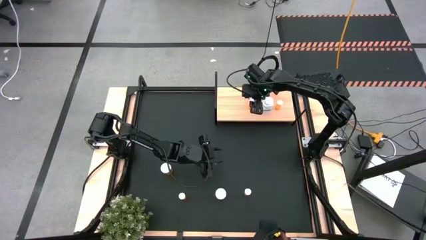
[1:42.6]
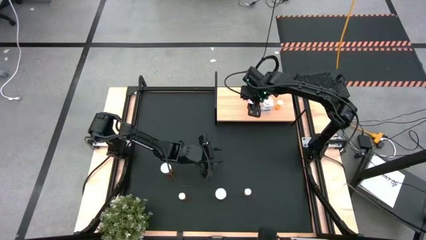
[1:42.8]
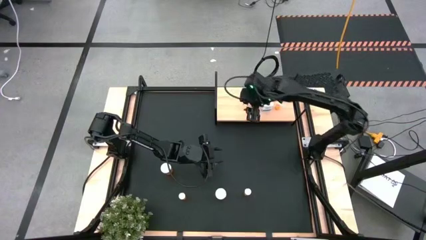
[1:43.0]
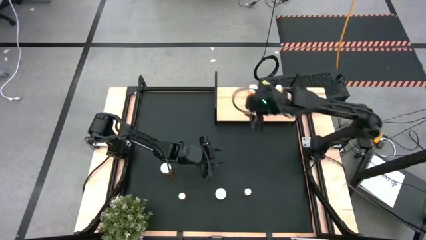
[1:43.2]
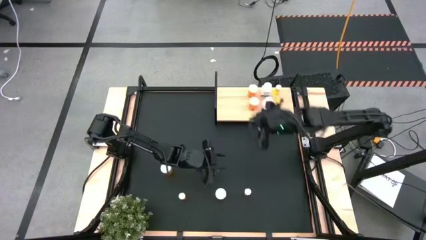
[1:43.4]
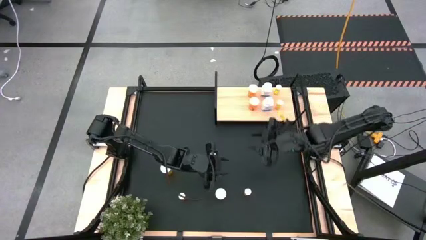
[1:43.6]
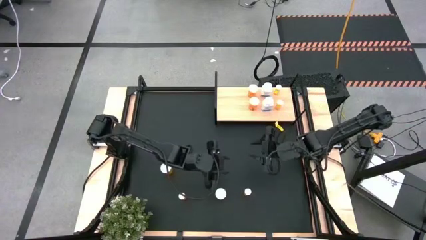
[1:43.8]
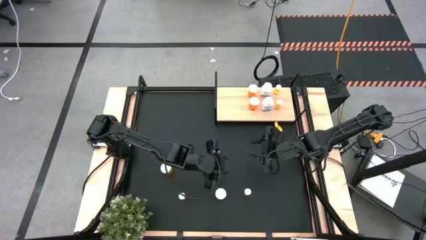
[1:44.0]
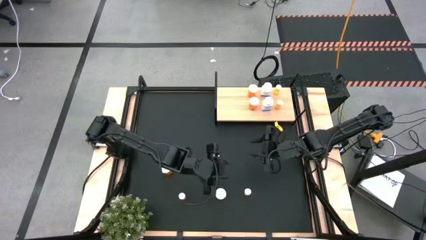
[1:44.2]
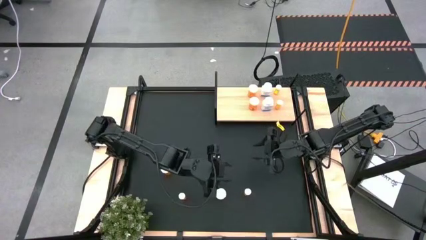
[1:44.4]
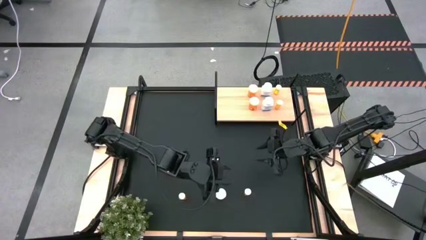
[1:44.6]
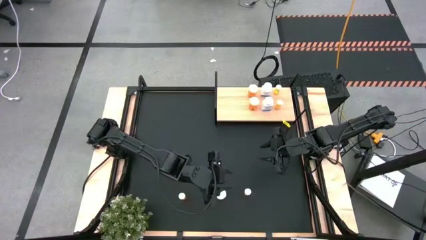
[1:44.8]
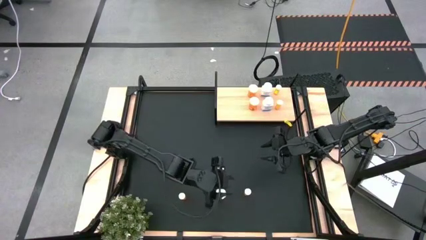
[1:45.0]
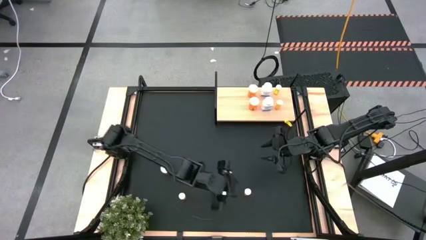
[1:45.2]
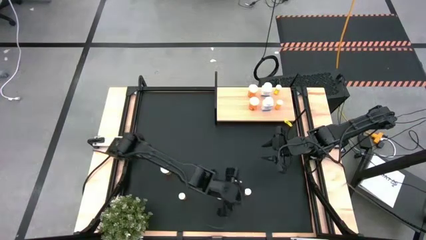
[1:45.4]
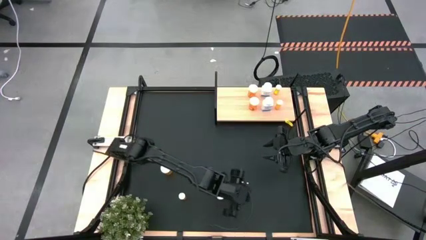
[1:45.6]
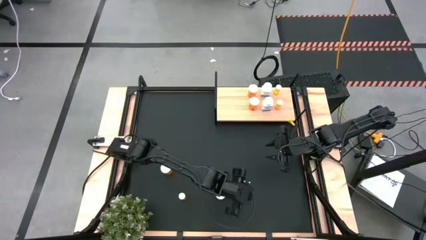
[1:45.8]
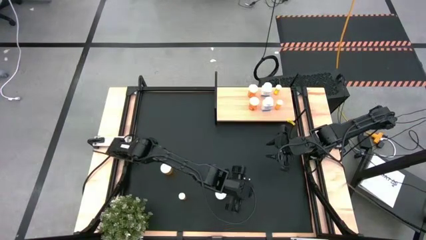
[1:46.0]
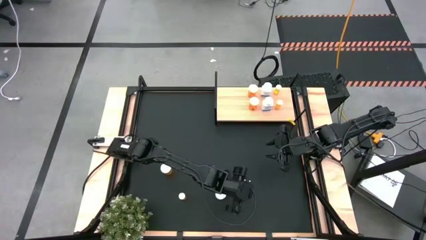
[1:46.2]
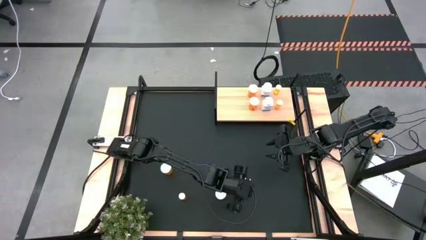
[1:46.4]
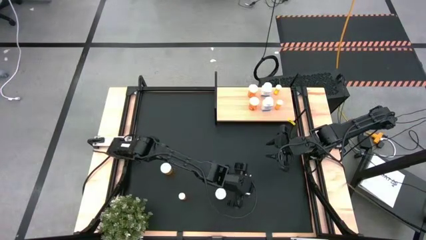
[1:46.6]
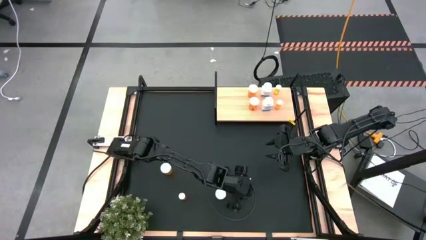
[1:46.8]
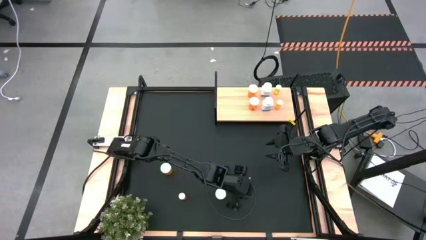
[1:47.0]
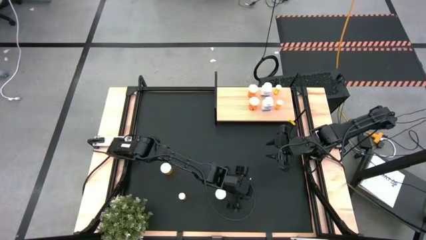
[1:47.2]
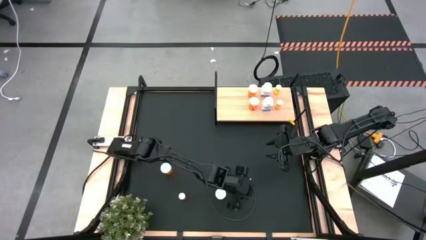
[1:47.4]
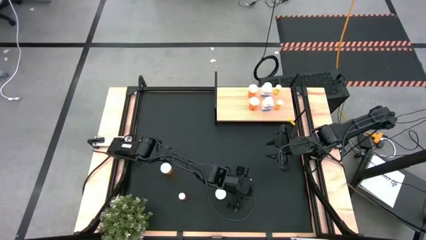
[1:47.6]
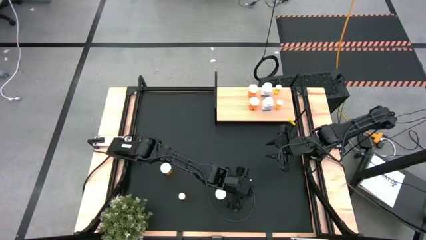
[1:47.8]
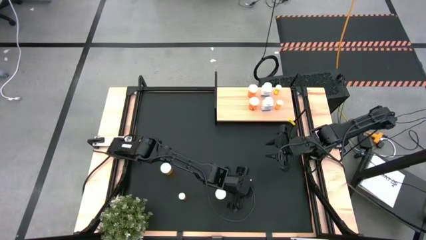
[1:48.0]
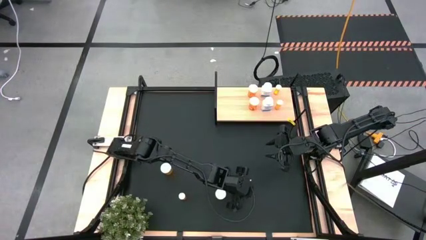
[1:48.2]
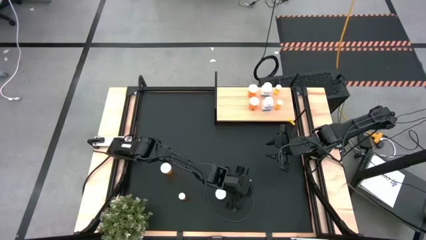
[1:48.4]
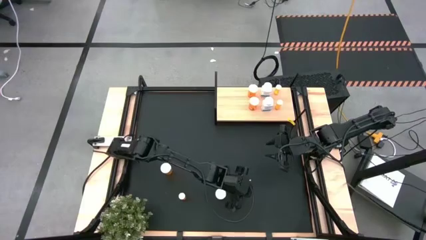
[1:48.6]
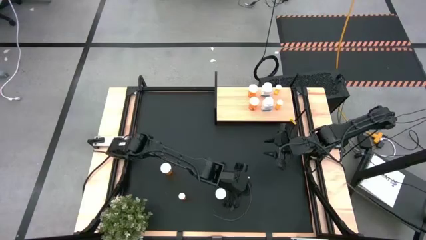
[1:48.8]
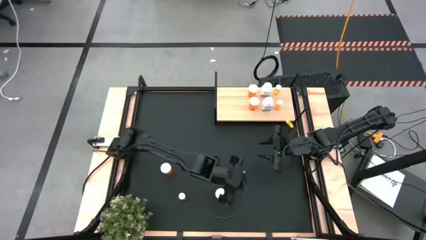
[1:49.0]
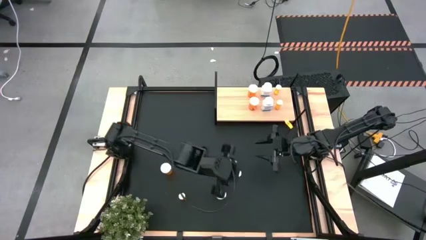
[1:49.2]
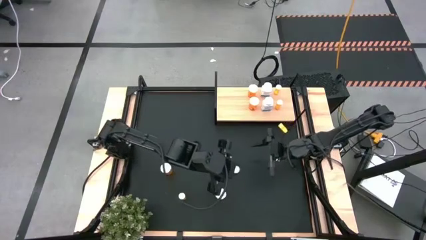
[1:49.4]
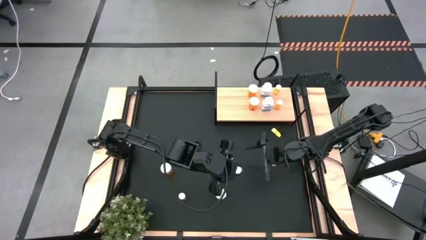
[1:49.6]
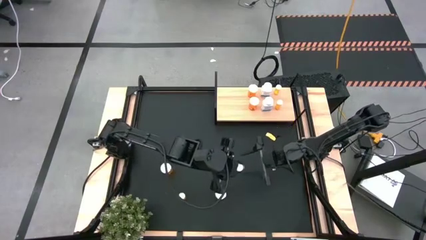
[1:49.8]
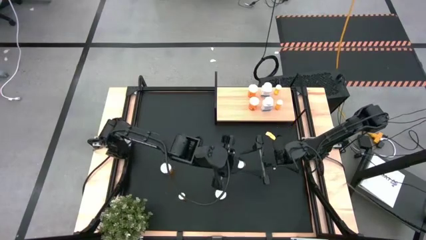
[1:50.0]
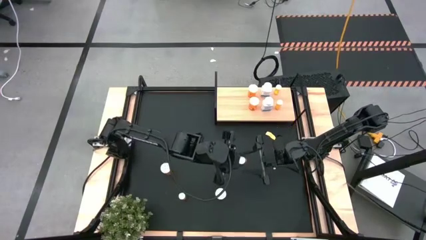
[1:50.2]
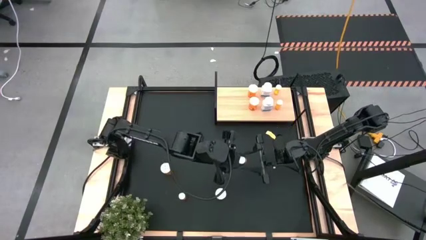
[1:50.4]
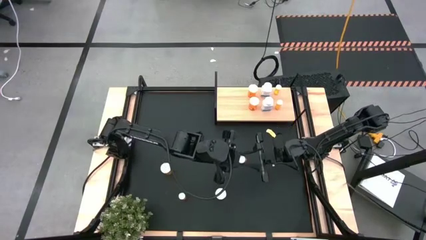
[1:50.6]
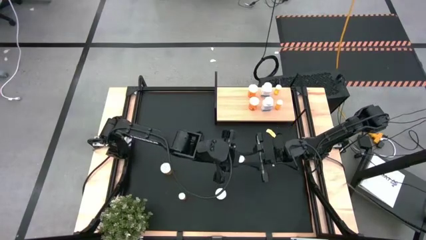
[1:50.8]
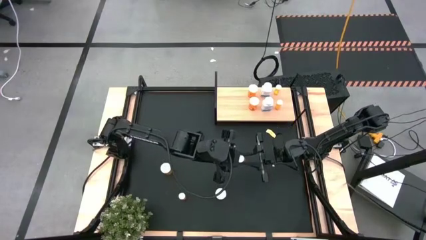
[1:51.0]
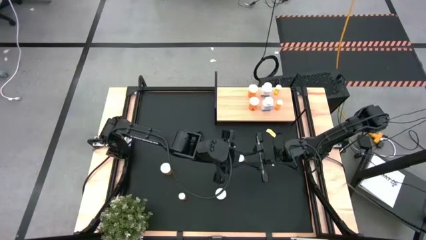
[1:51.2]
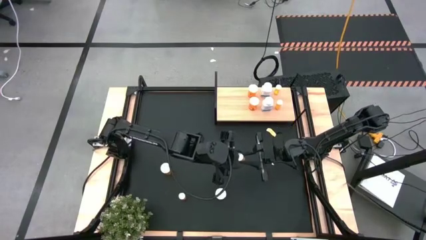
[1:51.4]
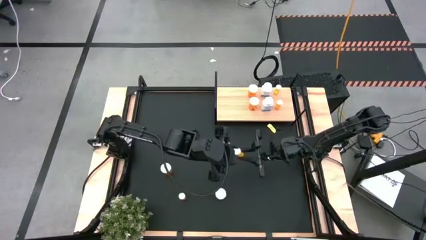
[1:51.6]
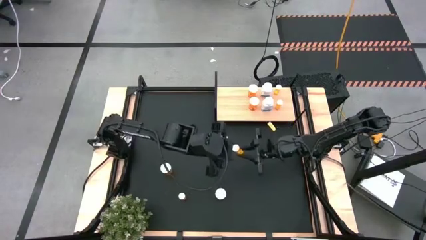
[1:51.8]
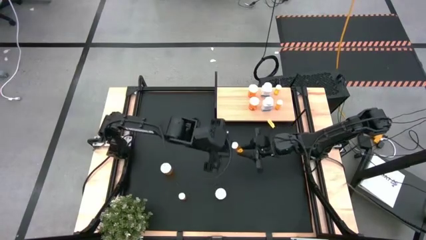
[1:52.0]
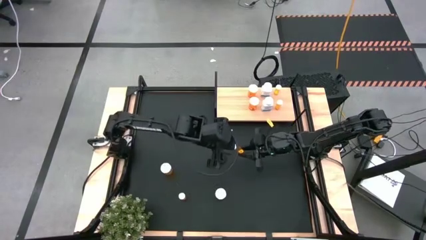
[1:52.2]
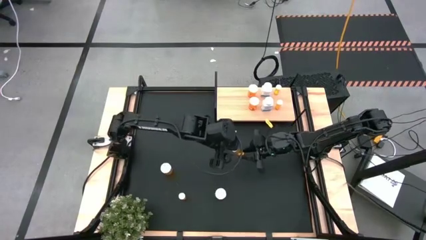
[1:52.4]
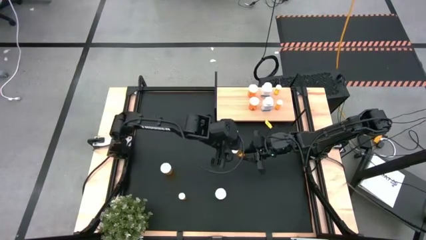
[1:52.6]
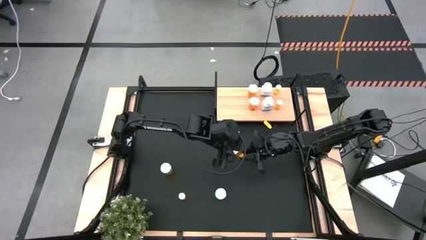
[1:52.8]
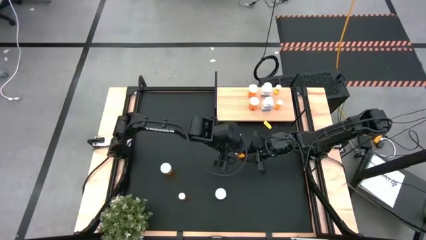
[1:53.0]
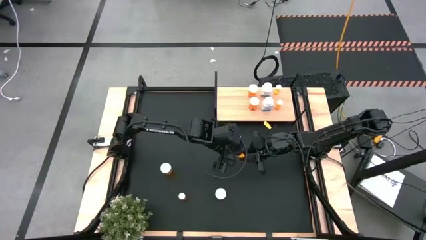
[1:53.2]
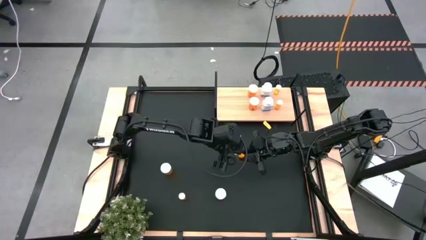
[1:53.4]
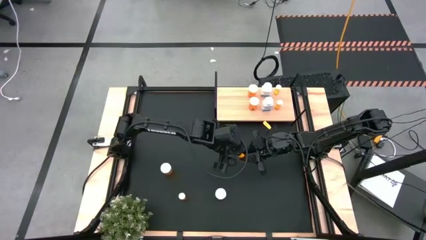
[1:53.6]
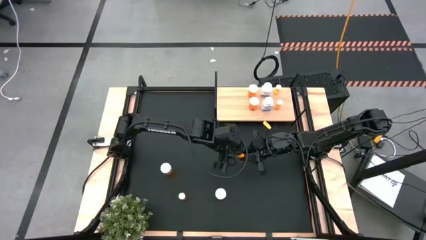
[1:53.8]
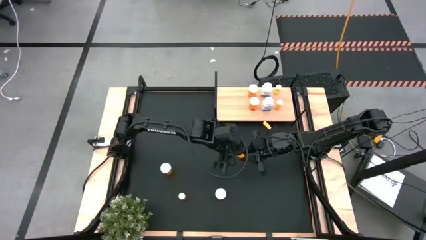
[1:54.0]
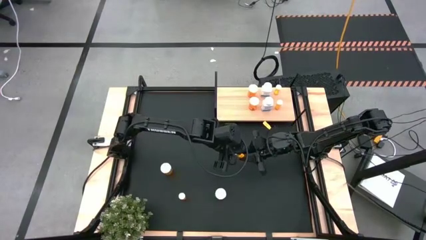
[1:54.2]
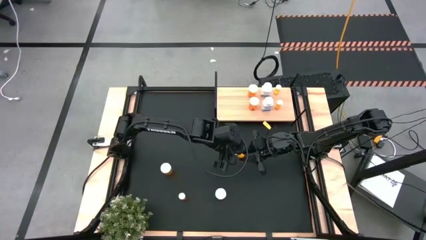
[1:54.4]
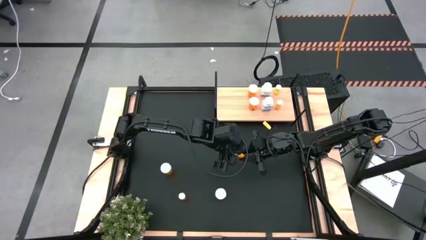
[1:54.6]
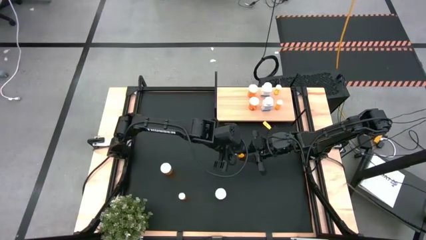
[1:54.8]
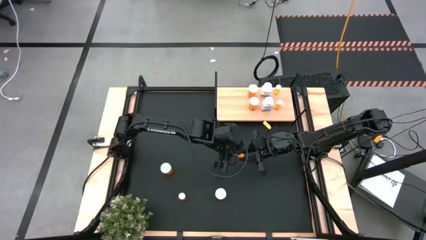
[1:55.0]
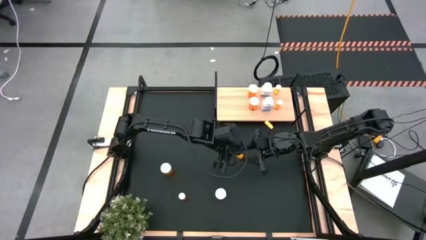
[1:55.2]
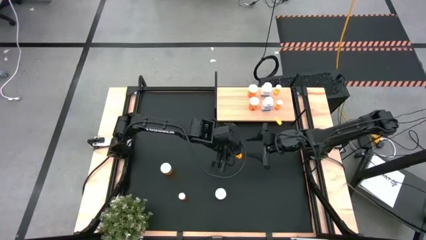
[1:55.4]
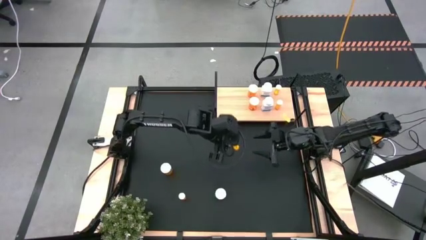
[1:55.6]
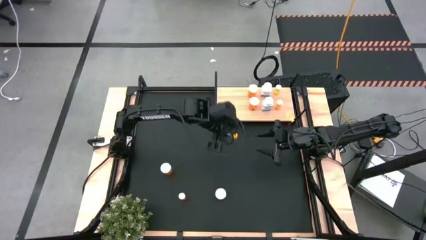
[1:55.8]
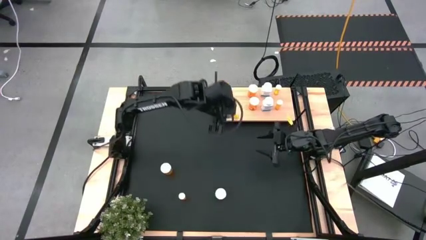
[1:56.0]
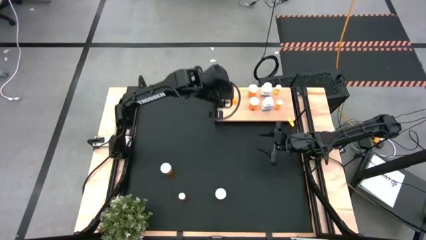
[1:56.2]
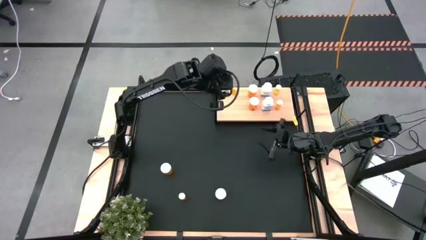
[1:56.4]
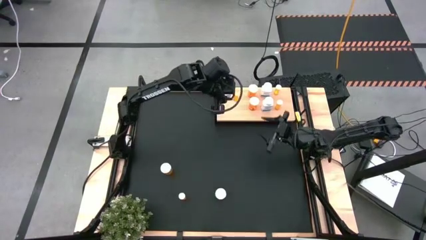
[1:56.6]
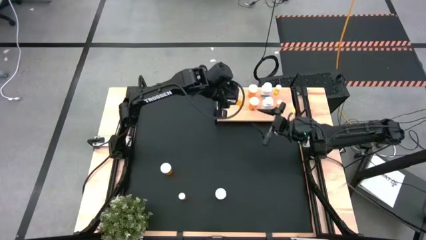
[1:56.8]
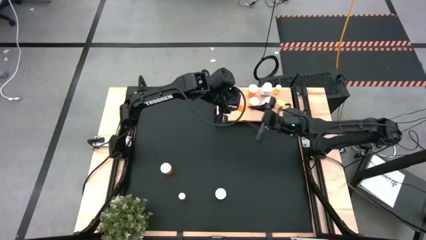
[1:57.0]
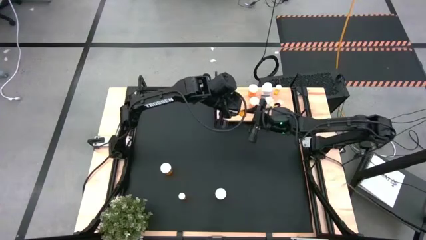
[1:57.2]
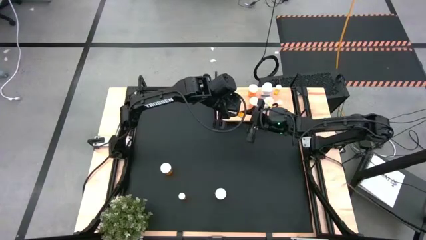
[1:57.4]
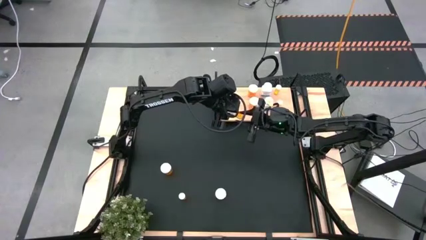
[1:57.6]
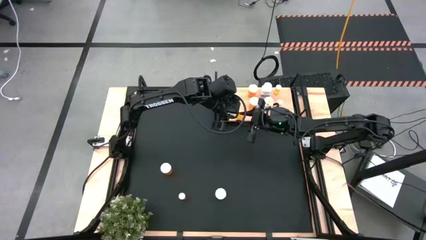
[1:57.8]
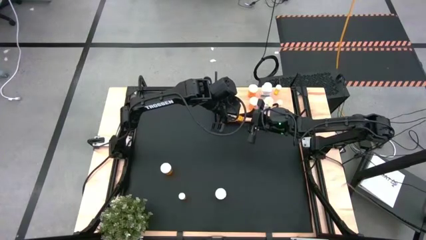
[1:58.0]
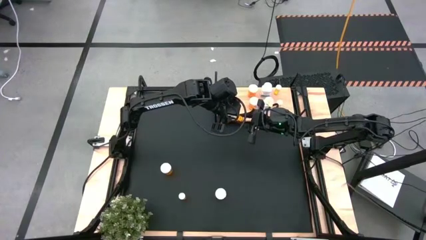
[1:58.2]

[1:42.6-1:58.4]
Task: Pick and place medicine bottles onto shelf by color
Put the small orange pill bottle on the shelf

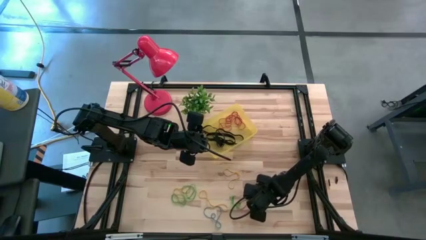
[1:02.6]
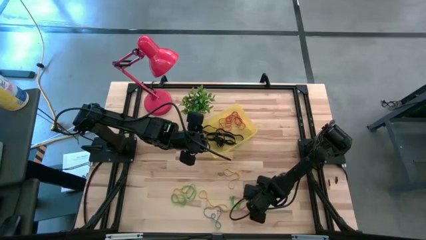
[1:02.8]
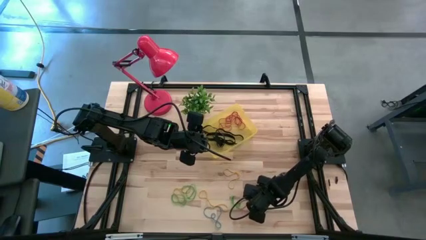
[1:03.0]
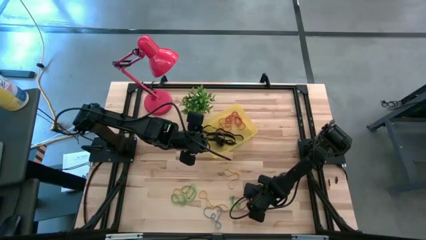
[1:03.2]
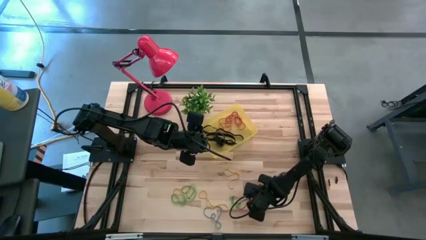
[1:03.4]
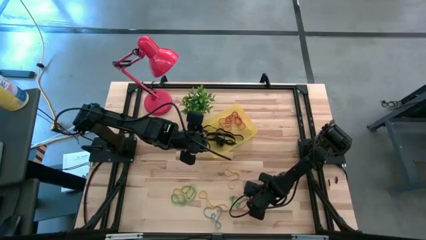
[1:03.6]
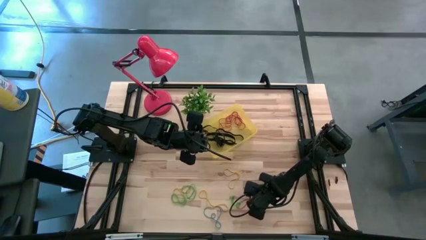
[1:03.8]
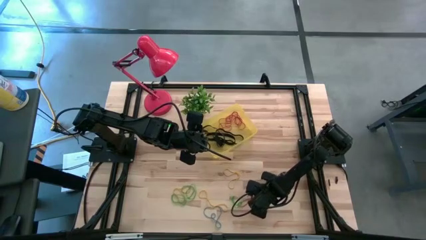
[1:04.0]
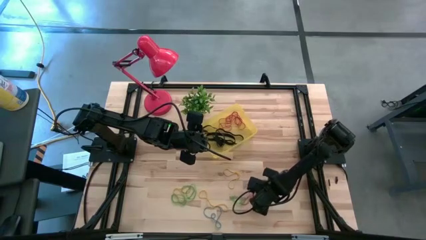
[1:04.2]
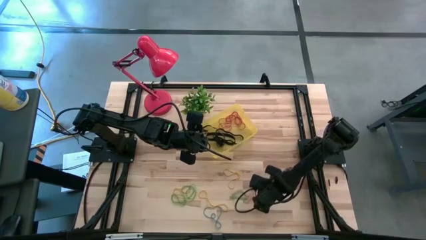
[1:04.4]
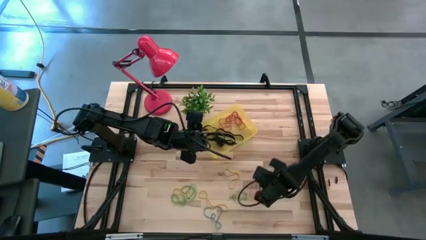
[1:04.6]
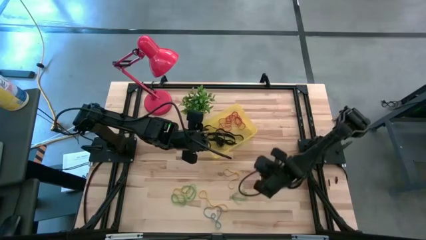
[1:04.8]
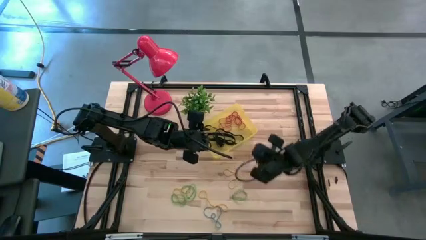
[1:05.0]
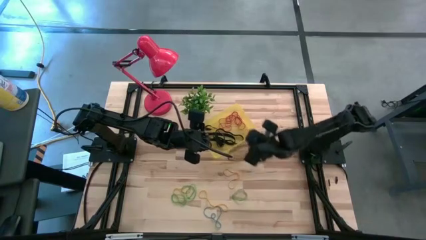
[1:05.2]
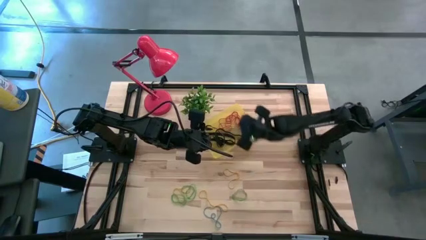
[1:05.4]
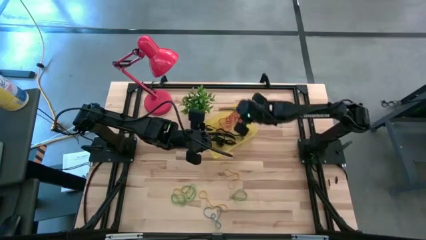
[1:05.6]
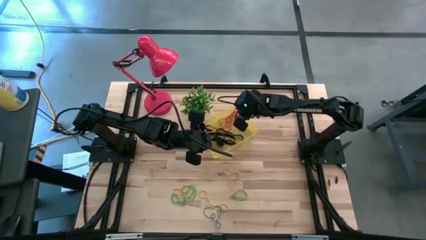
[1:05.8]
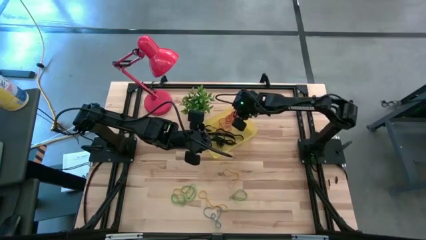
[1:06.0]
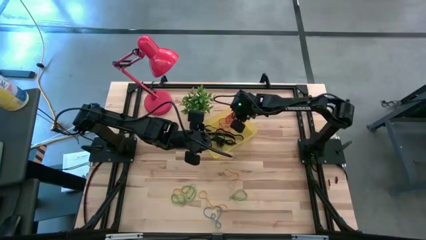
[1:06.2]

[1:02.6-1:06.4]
Task: Pick and place rubber bands into bin
Put the red rubber band into the transparent yellow bin
